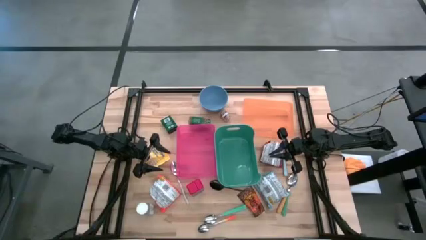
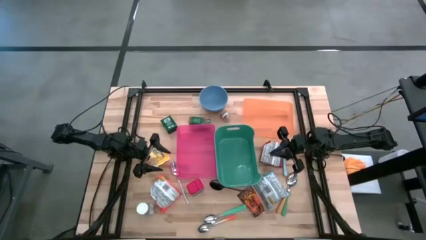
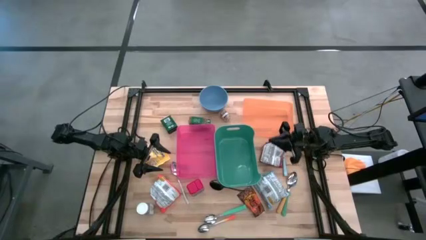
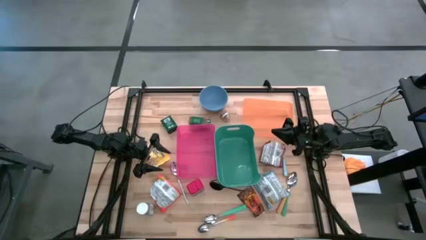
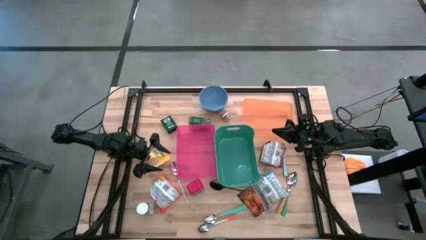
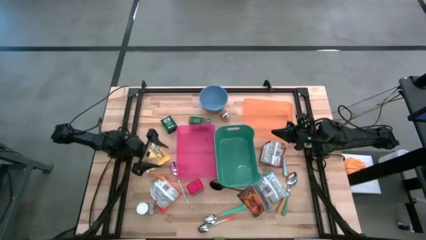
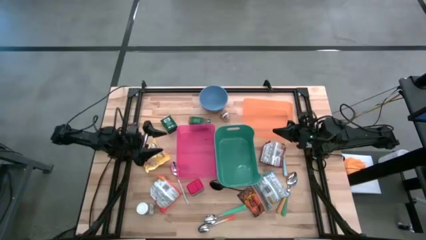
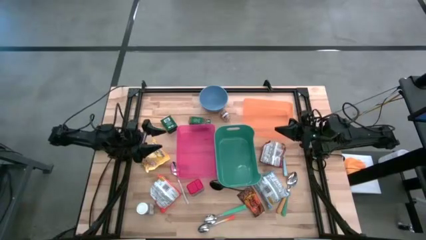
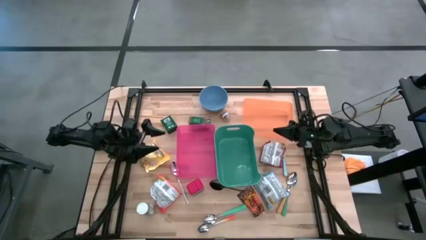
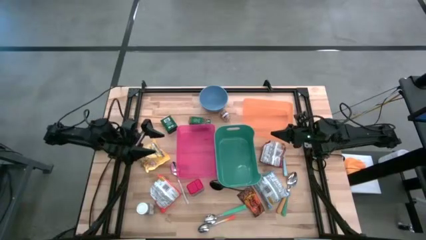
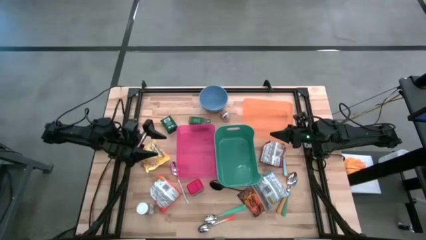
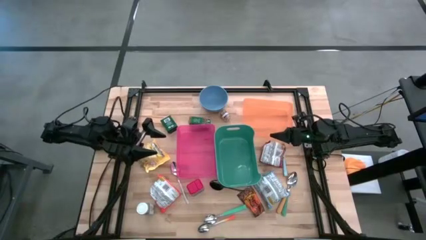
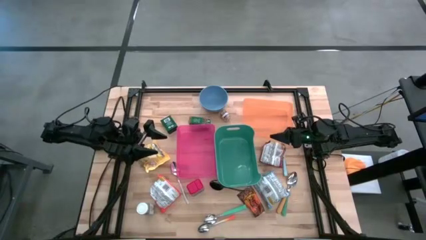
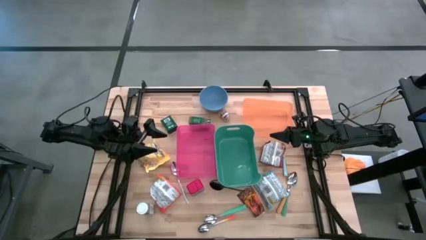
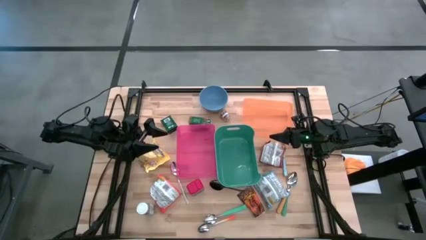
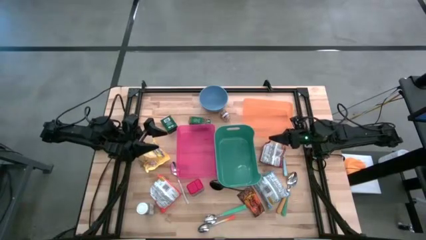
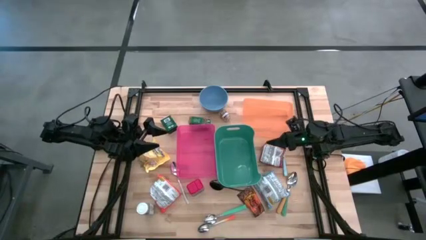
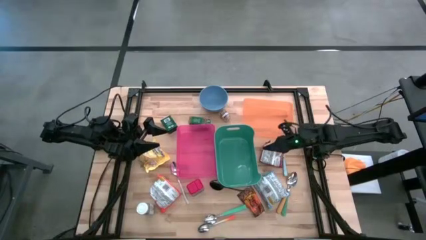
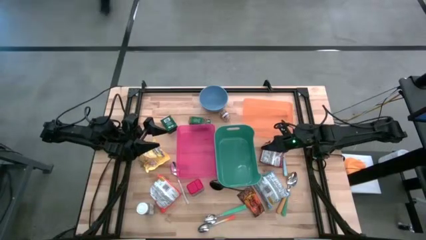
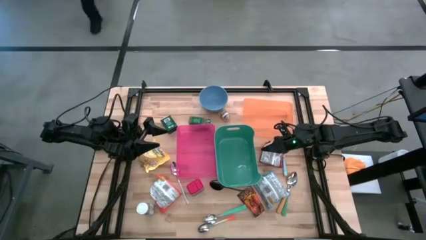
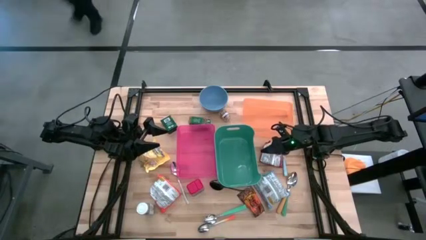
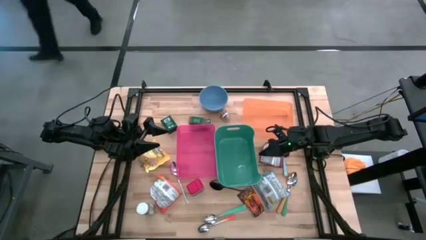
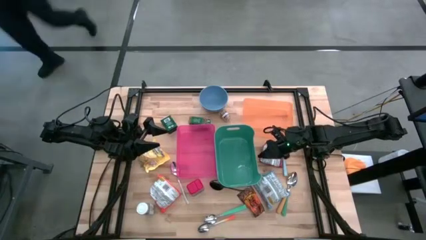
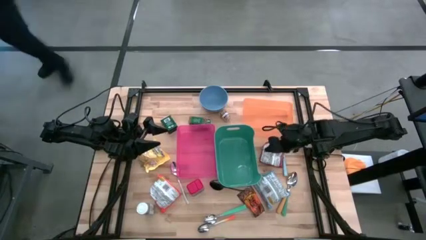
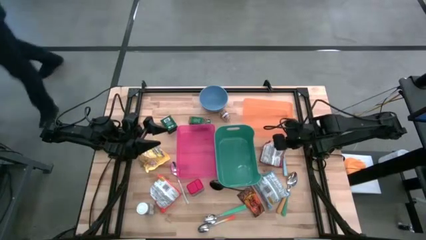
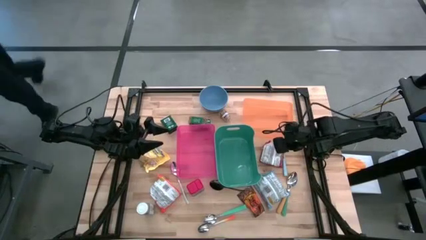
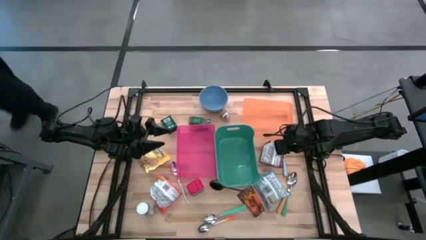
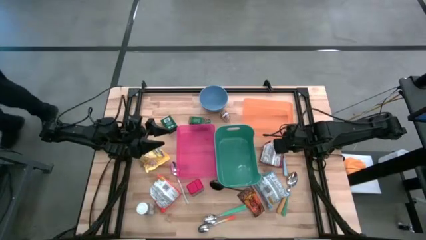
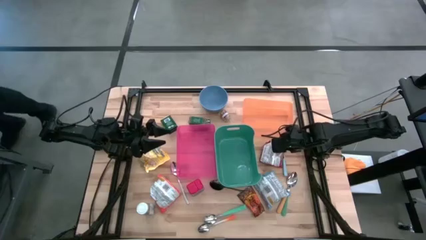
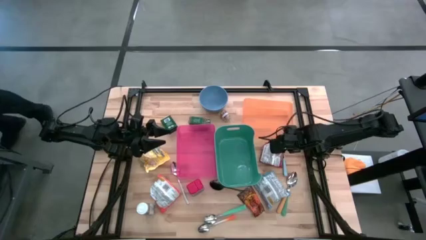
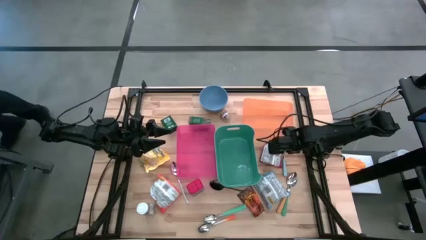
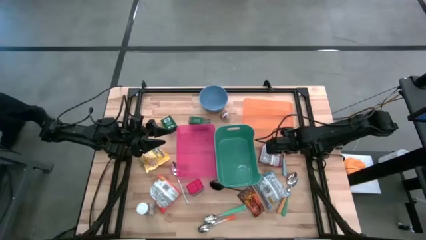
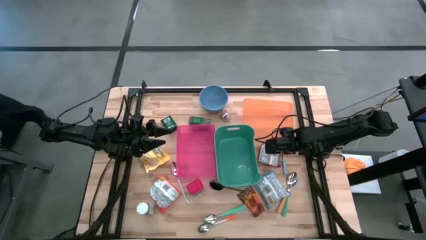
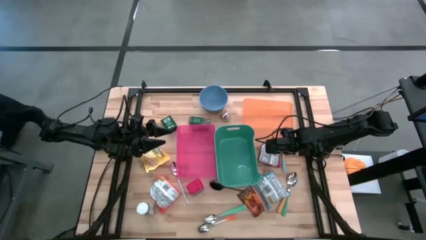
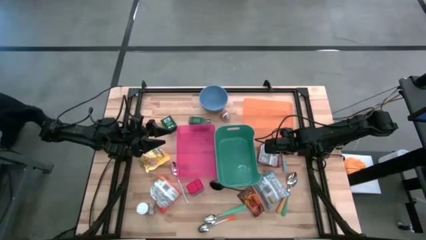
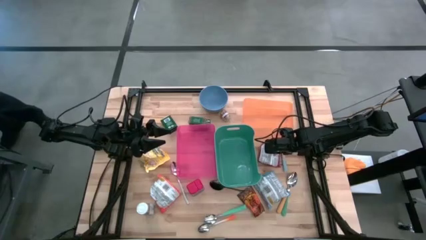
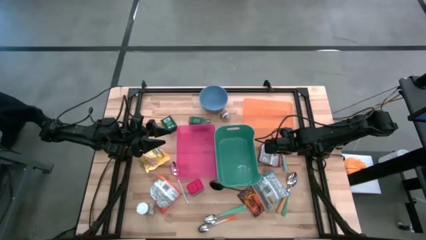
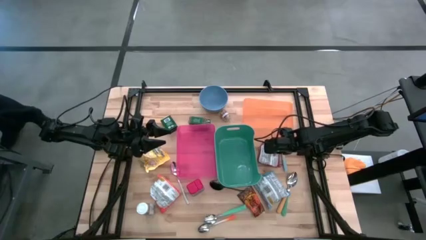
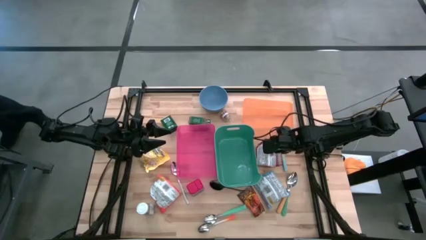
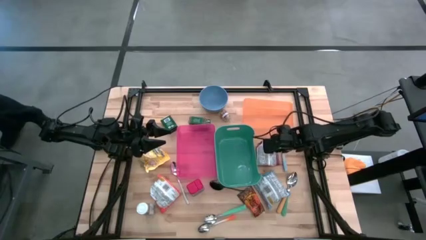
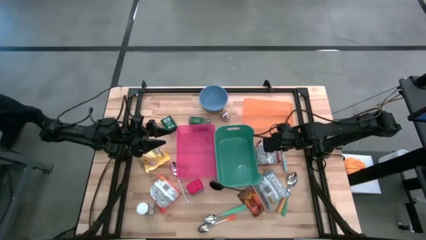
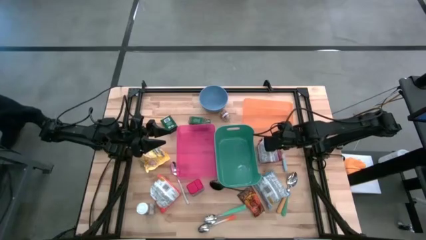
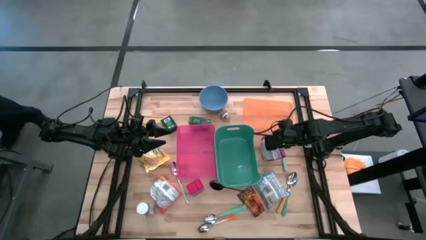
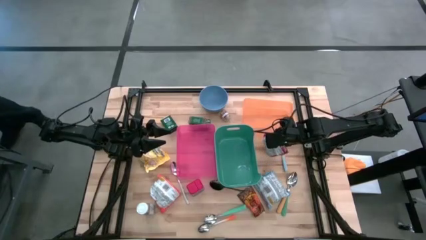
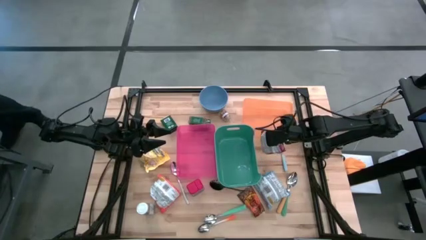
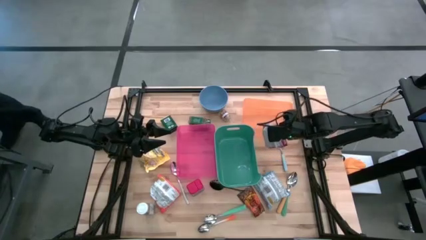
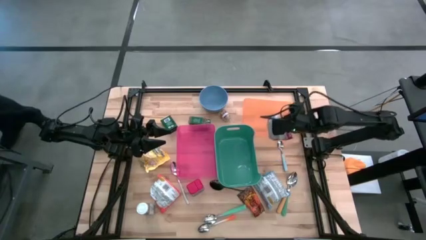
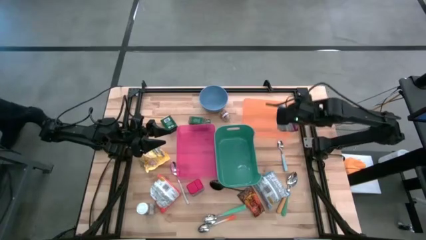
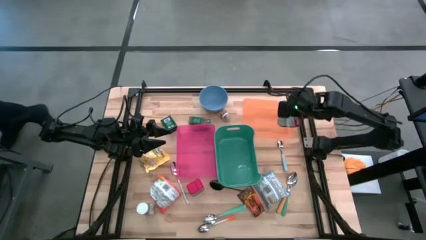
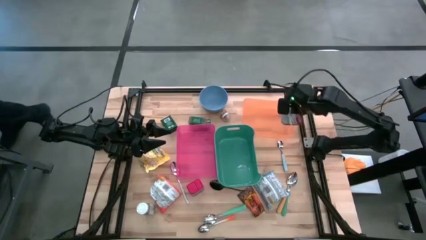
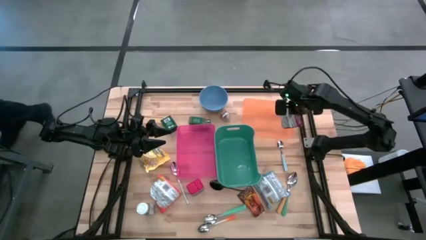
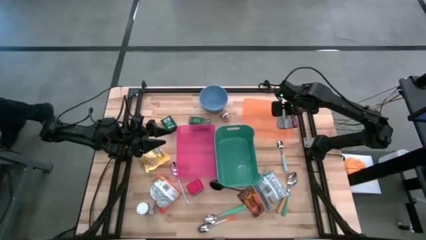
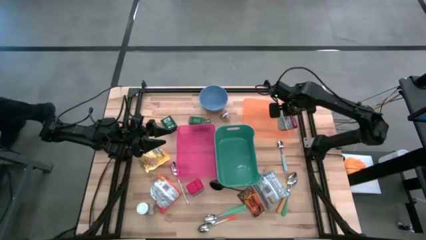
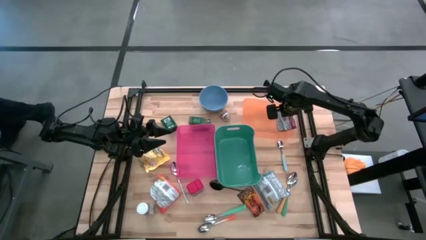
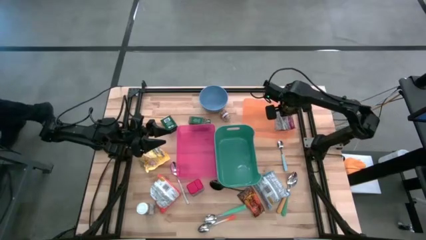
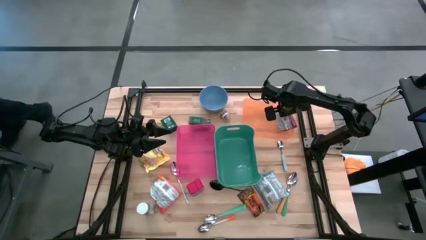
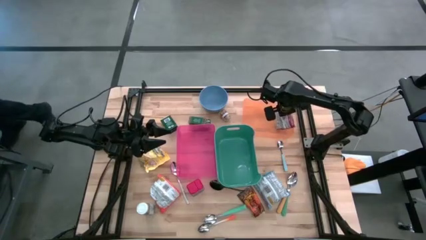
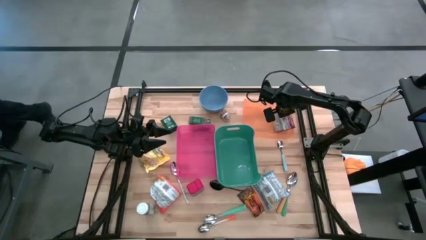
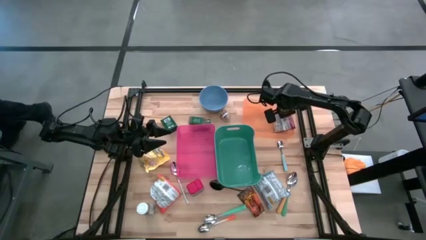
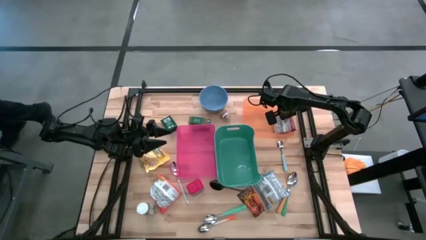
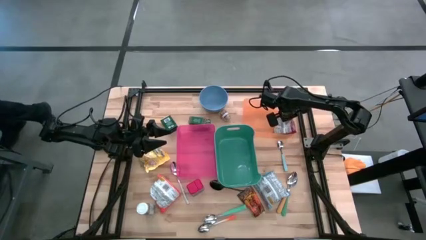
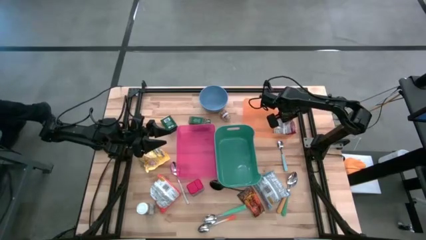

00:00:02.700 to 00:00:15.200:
Put the red noodle pack into the orange bin

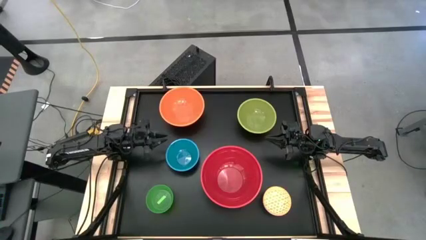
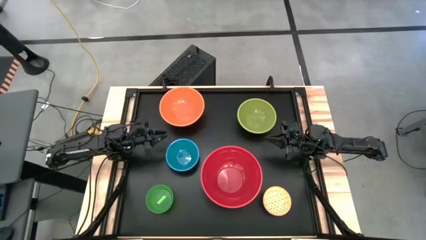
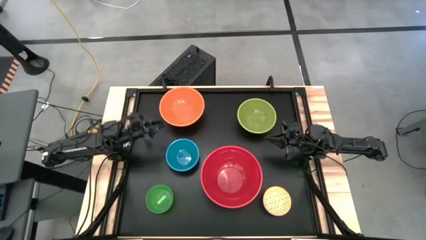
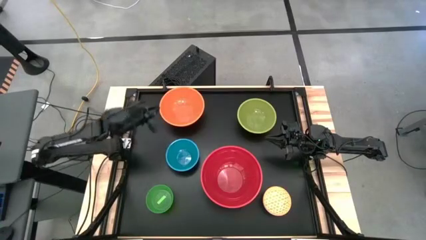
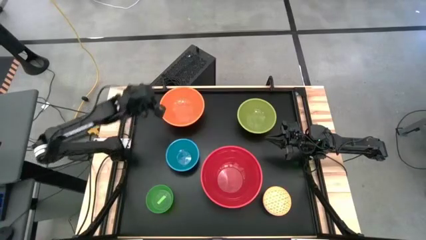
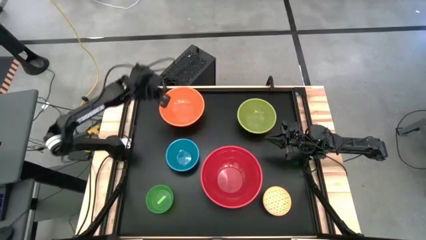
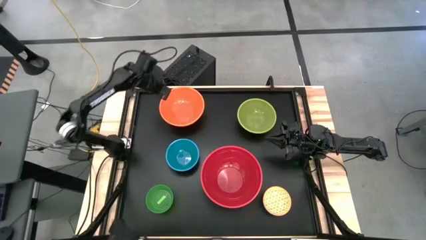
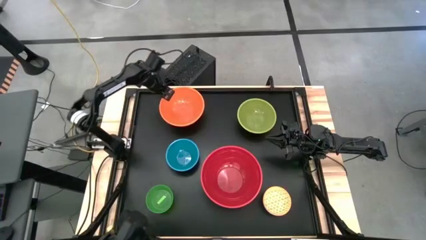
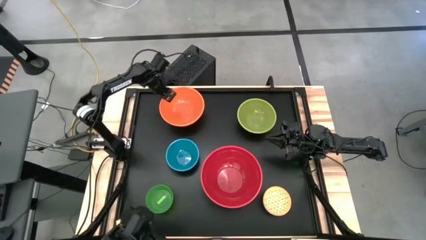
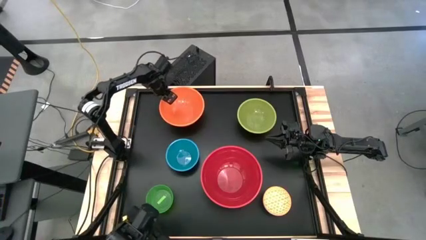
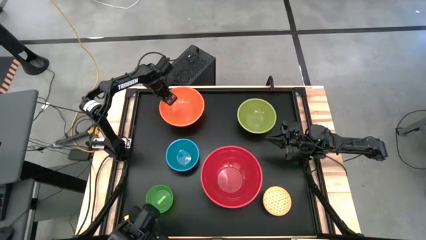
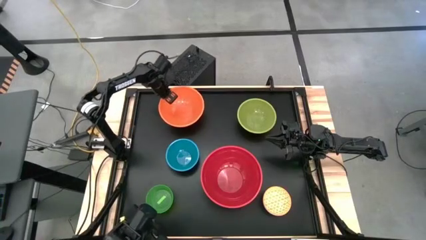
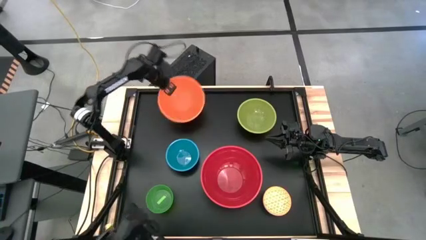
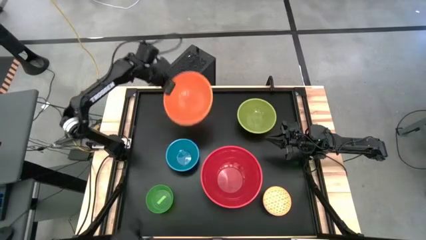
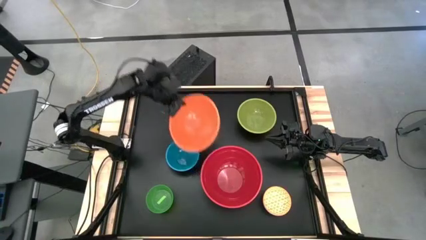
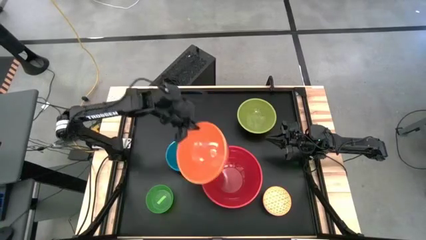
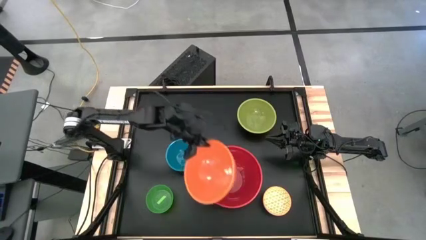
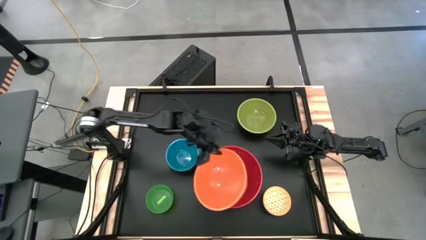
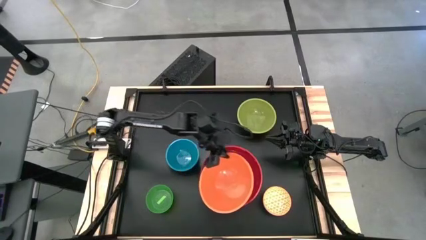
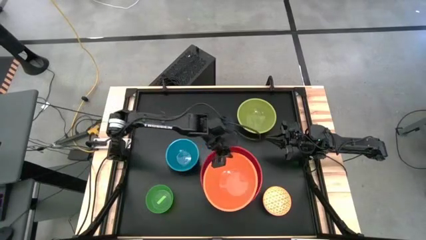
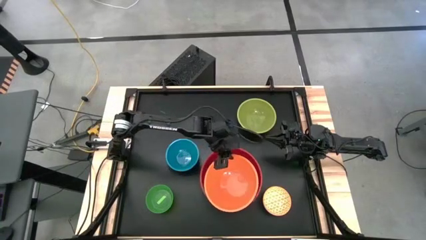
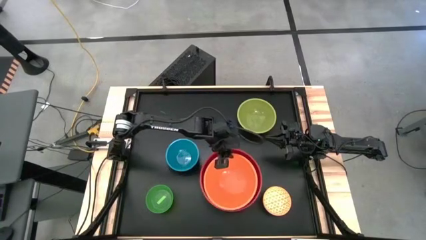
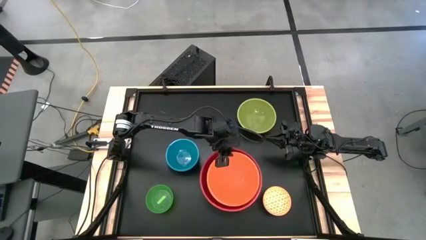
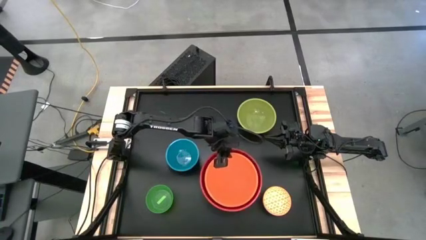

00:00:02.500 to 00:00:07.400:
Stack the orange bowl on top of the red bowl
